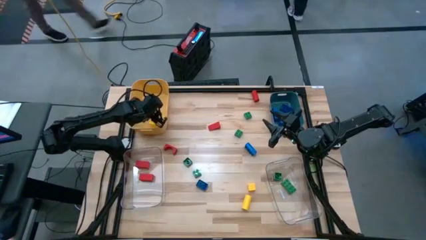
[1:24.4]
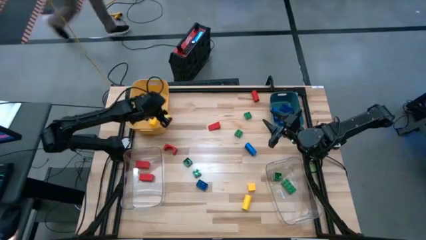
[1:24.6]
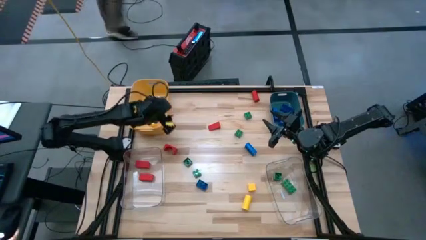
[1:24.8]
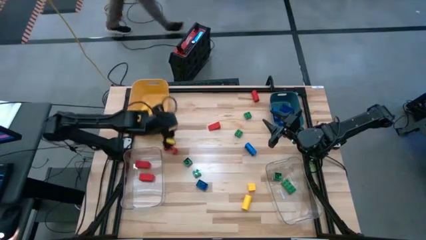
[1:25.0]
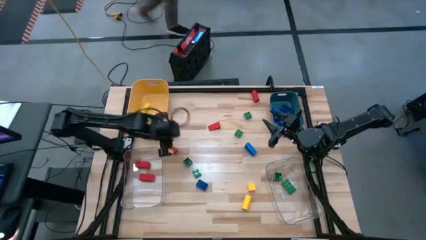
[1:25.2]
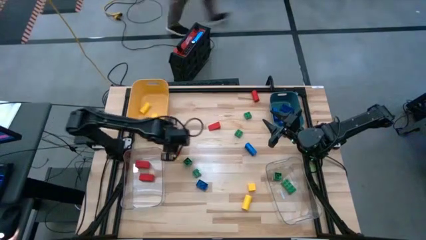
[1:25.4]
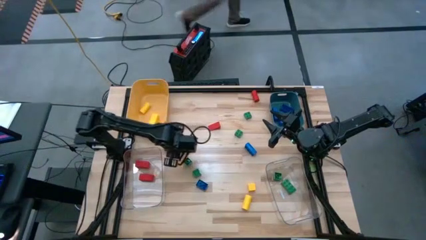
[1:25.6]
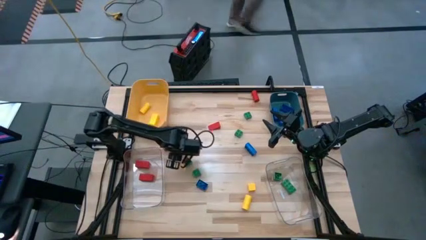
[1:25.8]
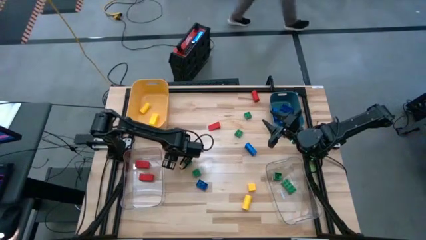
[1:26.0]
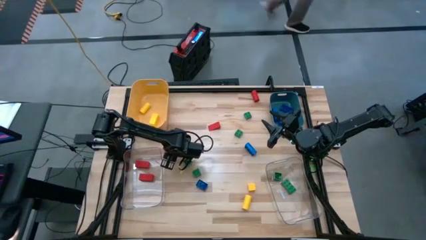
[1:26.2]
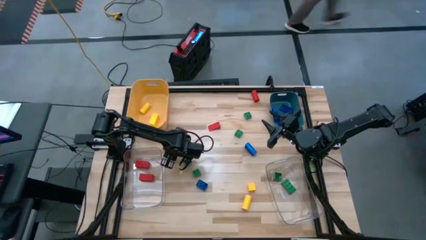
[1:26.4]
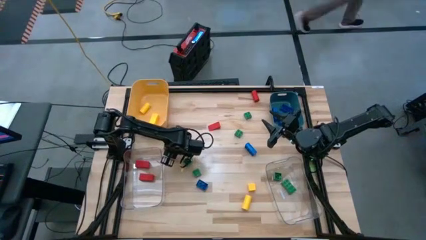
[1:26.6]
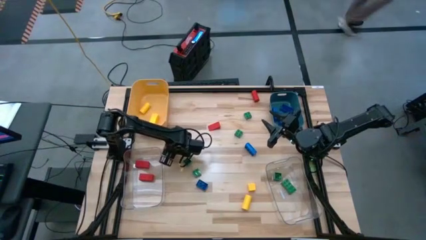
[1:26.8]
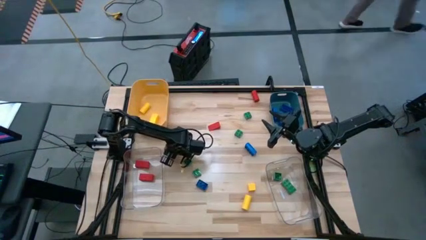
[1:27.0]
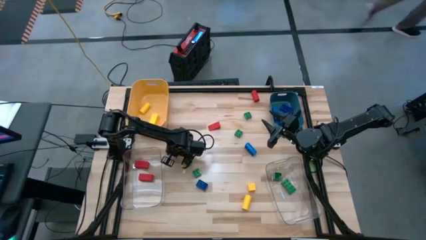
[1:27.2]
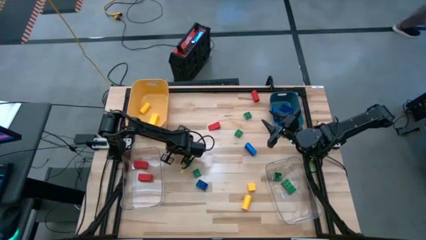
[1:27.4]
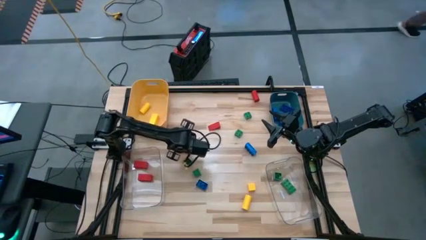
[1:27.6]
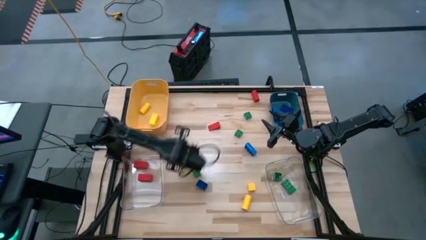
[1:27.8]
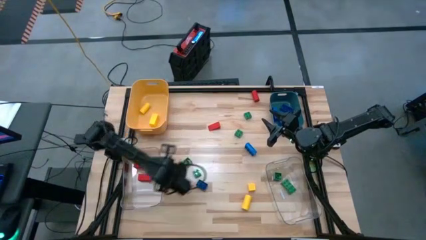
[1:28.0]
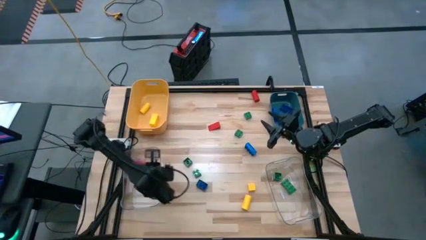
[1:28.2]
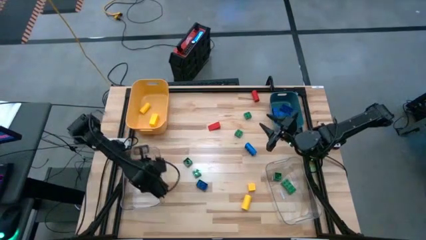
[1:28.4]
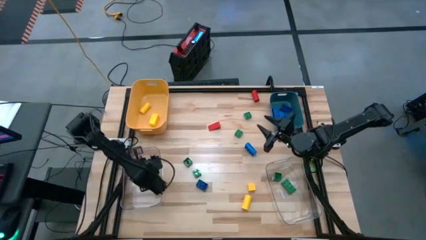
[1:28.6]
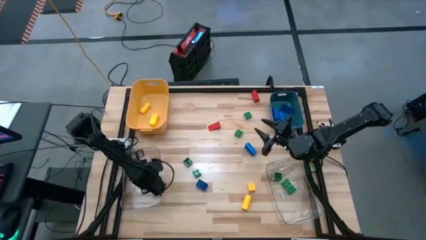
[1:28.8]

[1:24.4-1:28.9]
Task: Sort blocks
Put the red wooden block piece left transparent bin

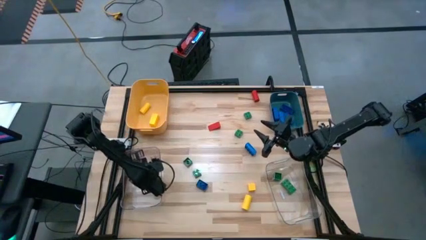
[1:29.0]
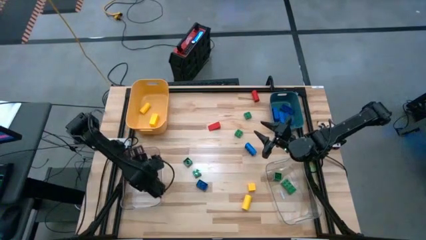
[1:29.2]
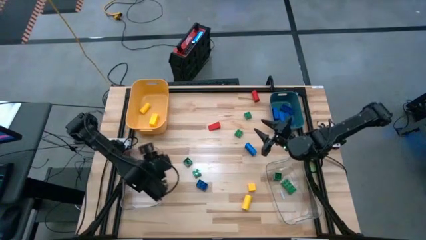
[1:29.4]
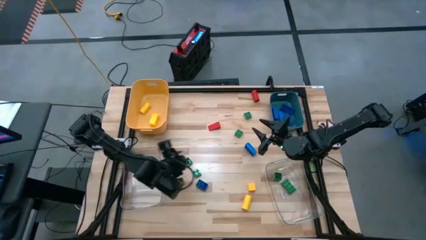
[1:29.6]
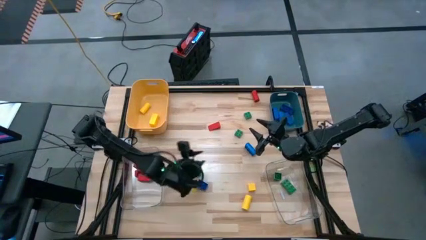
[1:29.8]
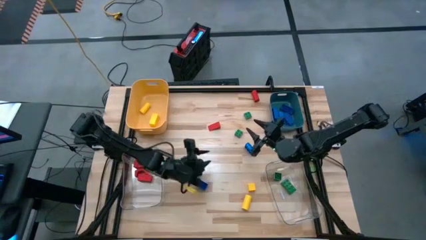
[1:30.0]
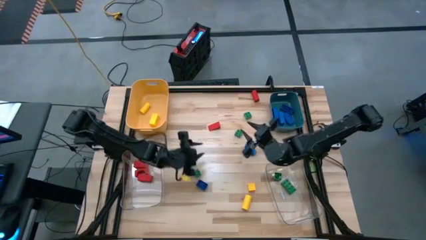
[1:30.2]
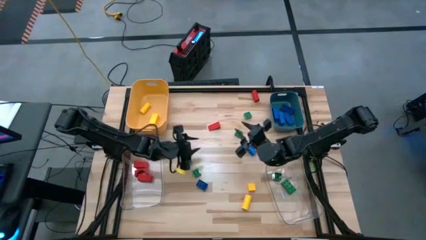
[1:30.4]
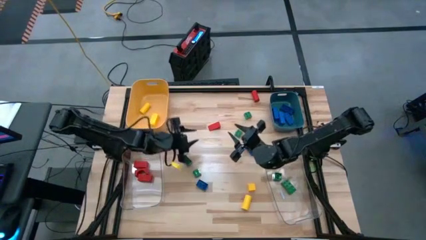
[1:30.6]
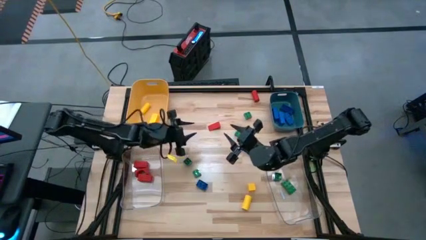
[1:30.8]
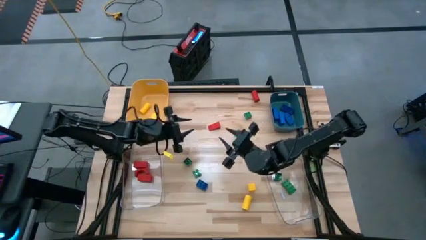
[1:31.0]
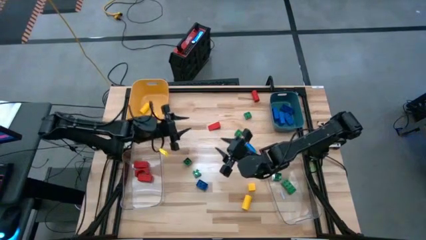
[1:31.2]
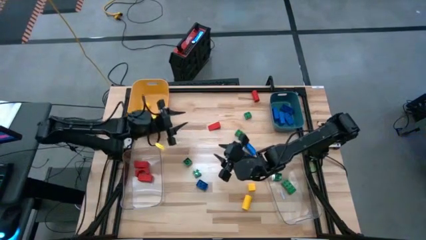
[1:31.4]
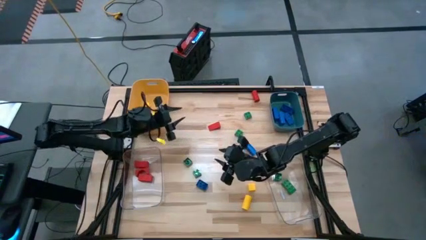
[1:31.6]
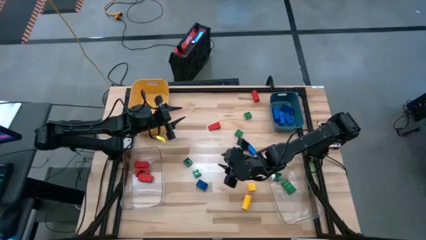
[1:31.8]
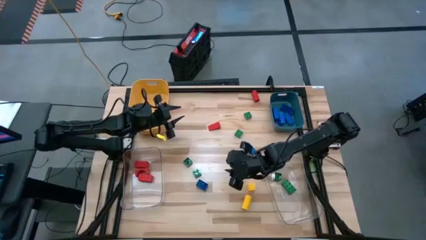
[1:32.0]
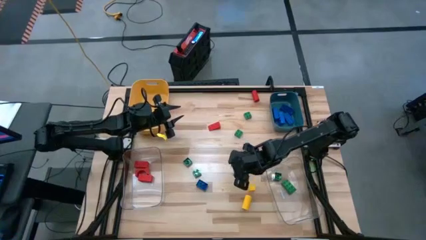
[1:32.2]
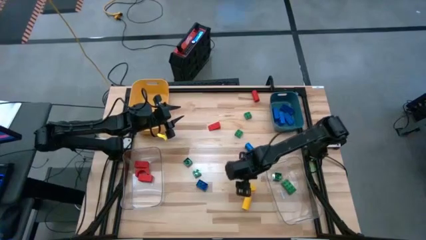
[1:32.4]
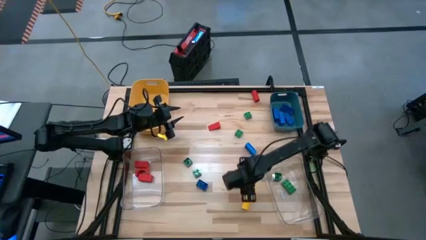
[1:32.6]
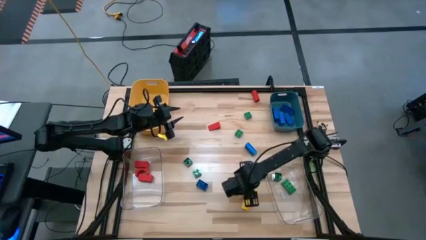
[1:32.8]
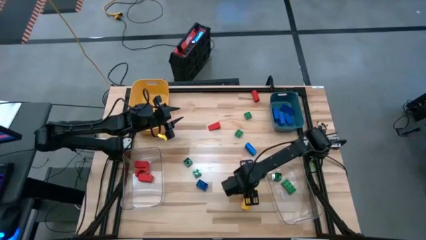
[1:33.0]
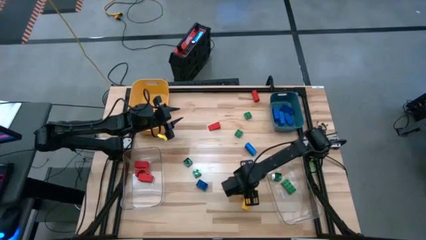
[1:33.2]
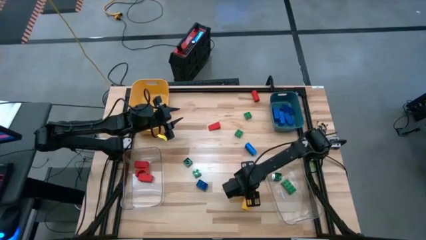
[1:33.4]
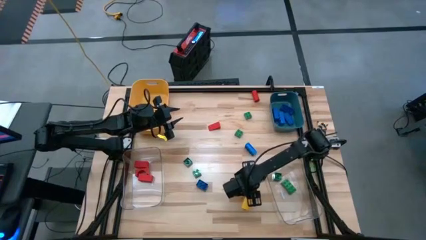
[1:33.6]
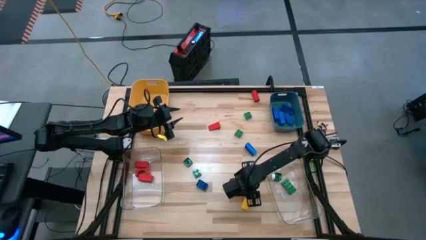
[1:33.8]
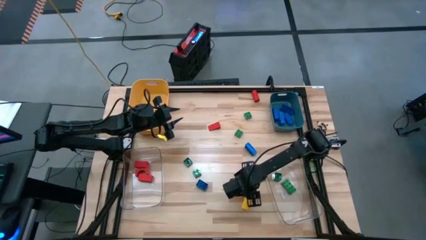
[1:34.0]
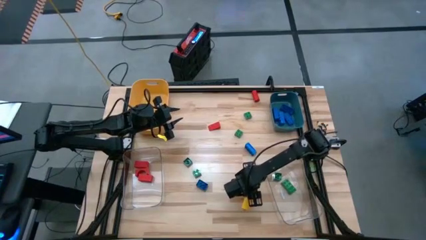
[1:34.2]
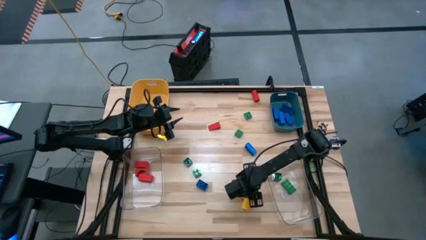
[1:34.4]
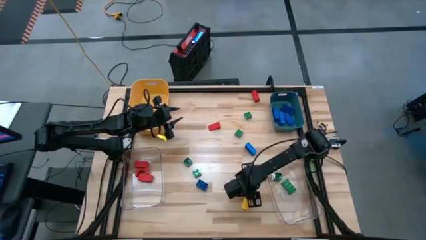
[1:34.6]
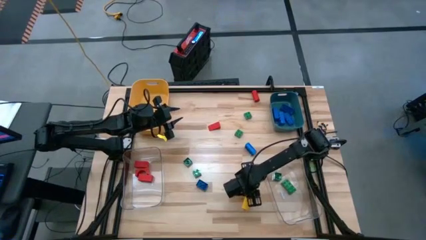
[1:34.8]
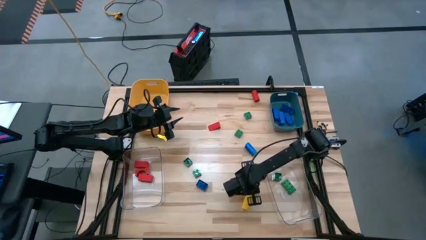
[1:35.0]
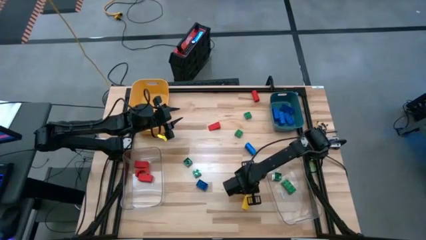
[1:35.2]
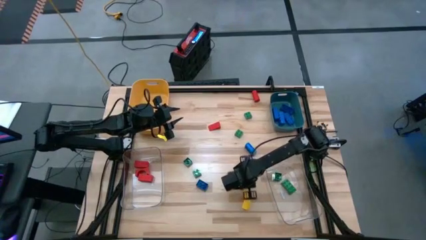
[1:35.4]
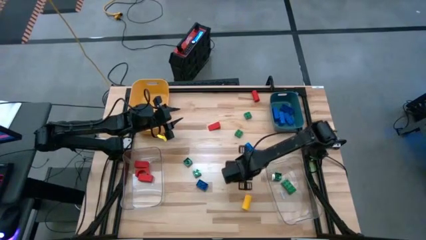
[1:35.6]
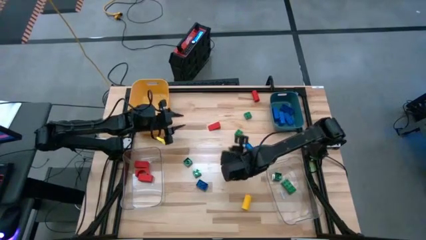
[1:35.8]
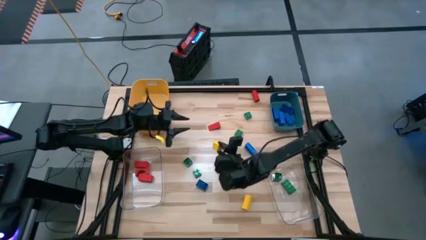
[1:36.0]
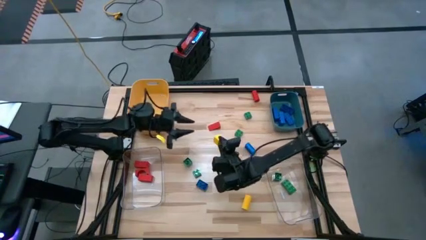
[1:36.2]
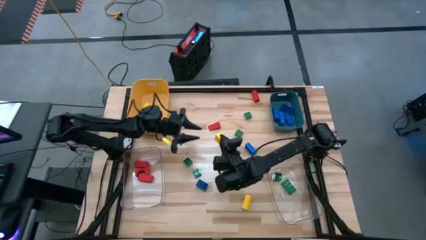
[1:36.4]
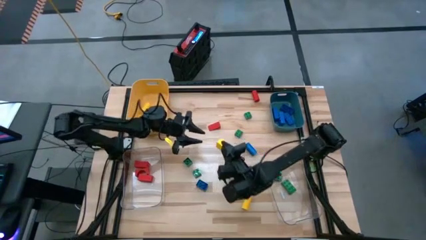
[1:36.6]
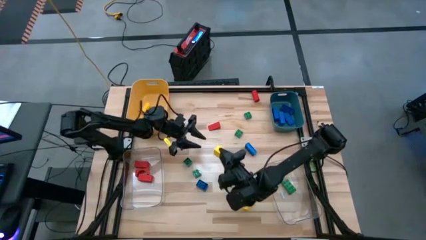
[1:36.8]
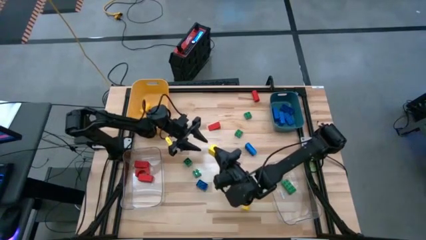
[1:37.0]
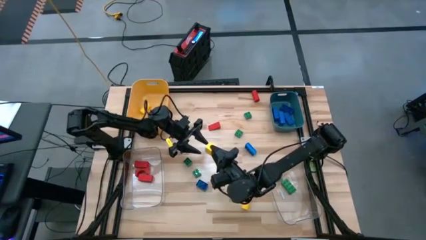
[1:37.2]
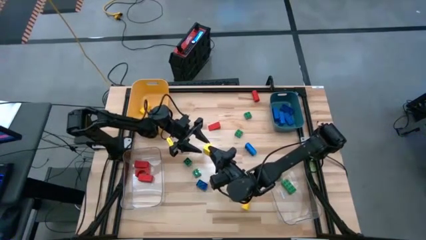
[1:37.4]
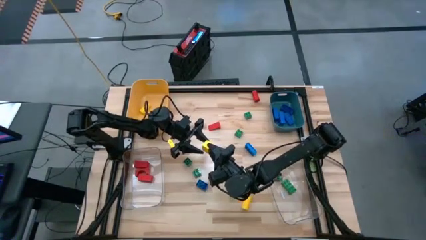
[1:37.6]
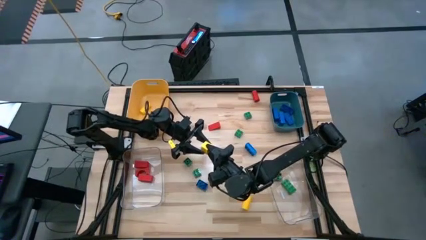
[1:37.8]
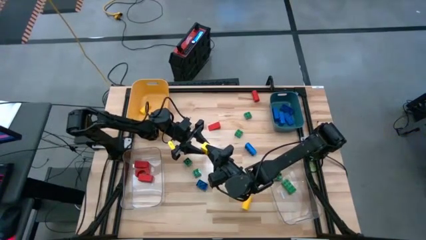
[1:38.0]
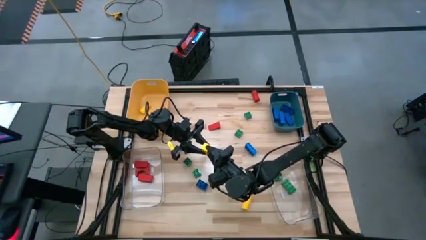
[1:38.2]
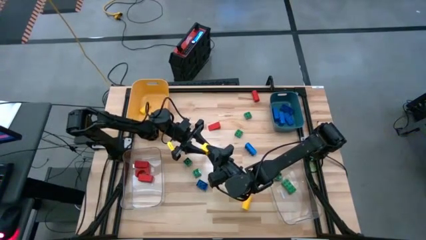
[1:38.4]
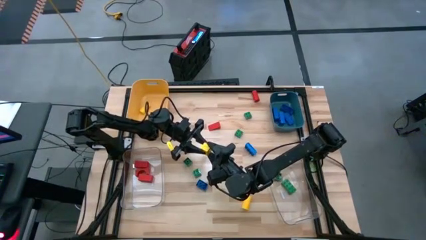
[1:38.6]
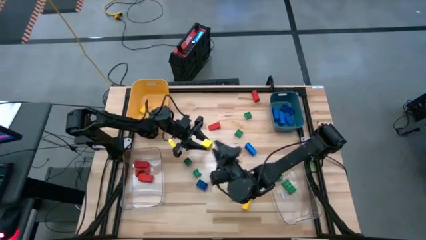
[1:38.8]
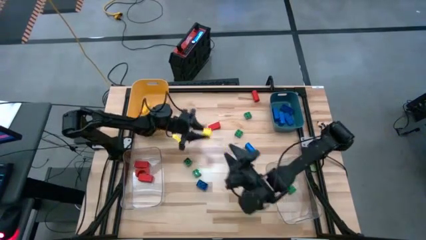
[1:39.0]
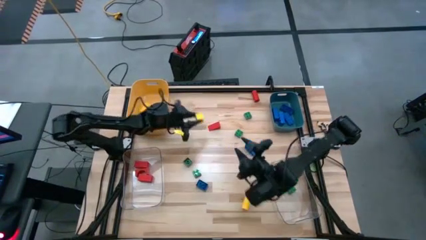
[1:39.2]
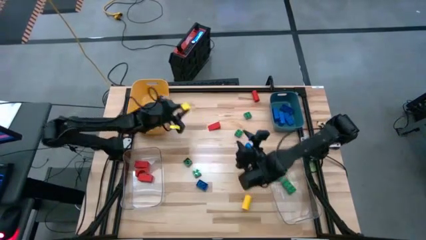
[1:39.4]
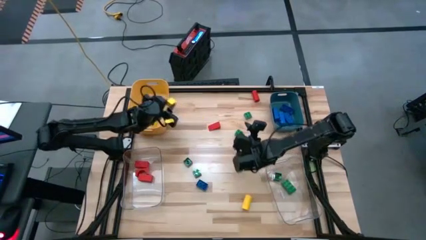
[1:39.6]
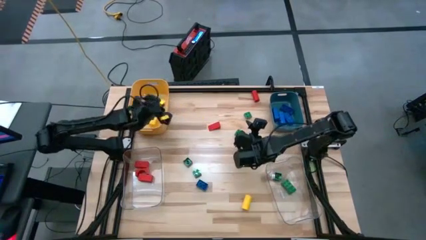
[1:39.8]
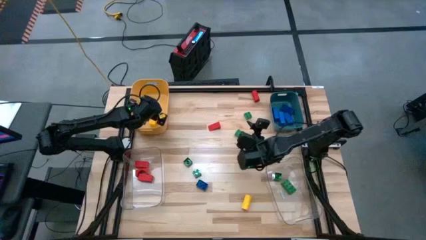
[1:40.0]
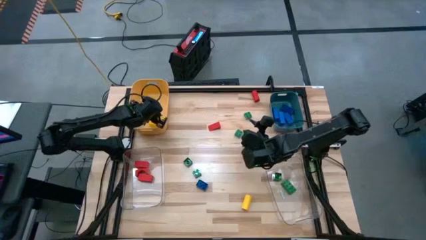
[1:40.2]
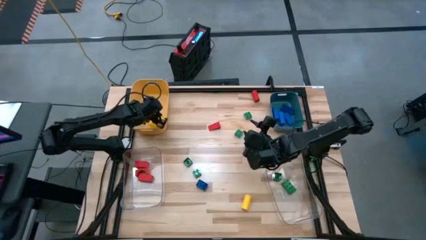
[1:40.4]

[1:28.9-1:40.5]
Put the yellow wooden block into the yellow bin
